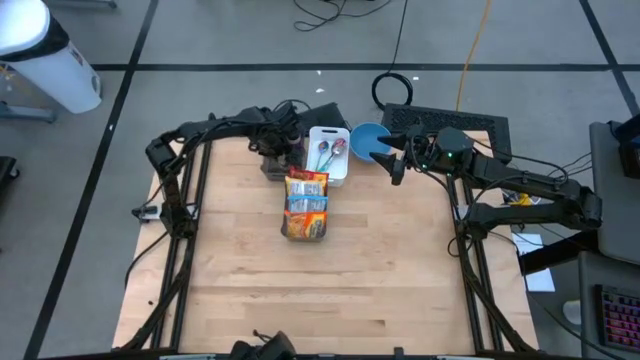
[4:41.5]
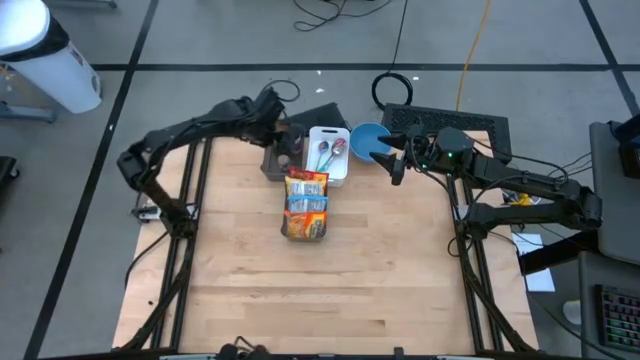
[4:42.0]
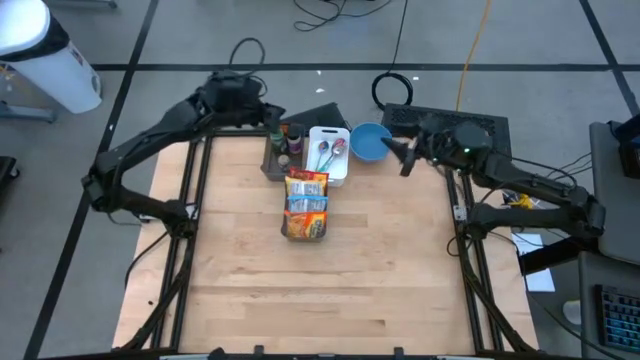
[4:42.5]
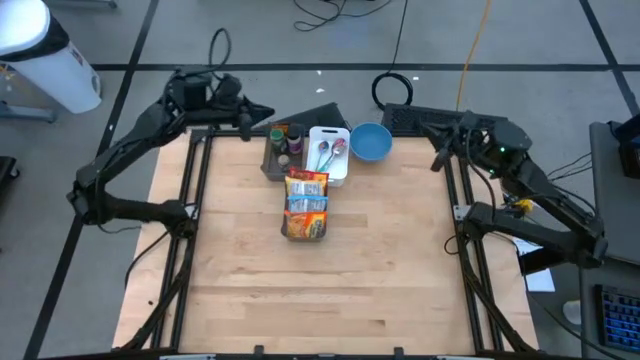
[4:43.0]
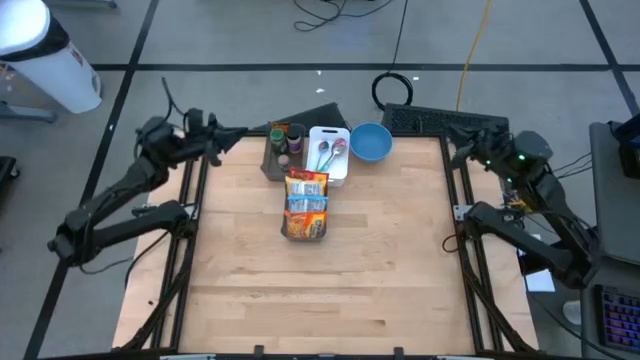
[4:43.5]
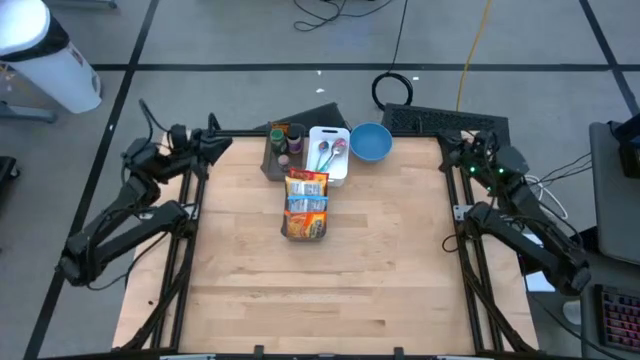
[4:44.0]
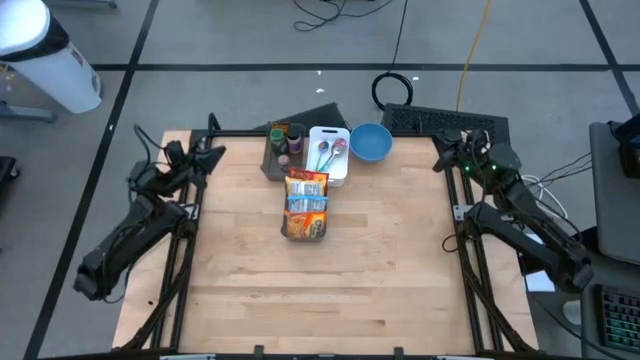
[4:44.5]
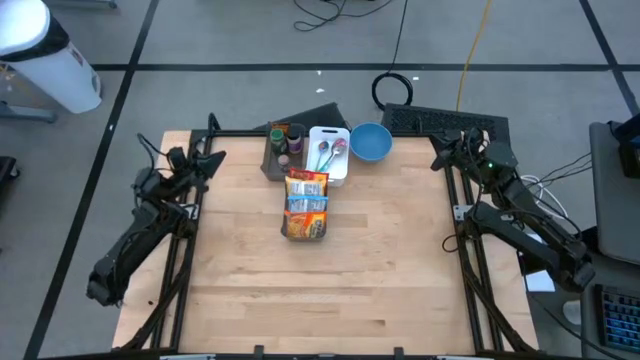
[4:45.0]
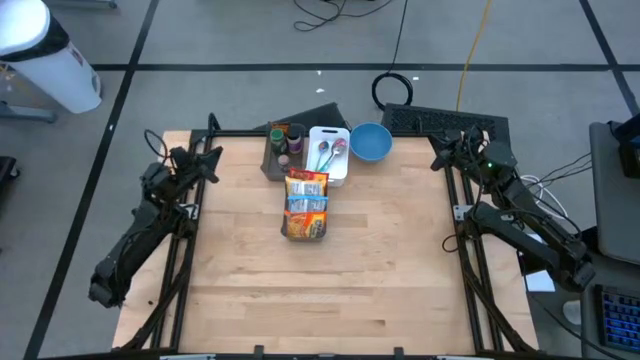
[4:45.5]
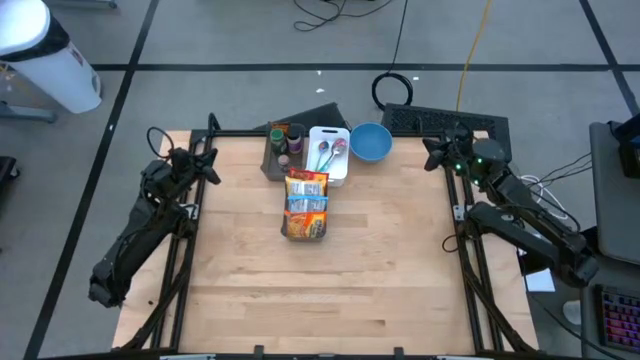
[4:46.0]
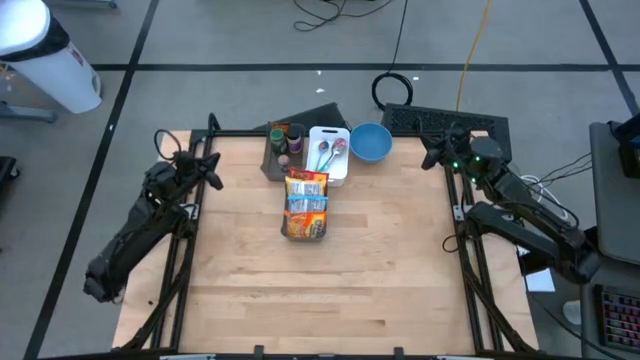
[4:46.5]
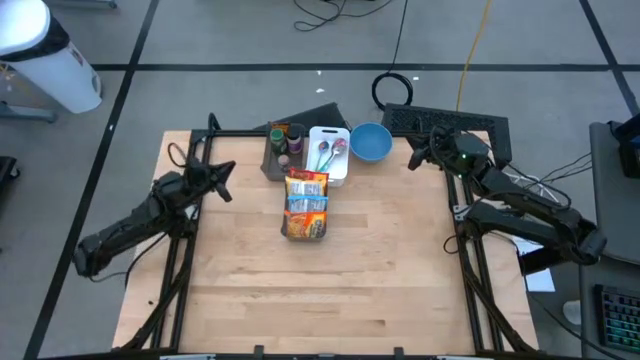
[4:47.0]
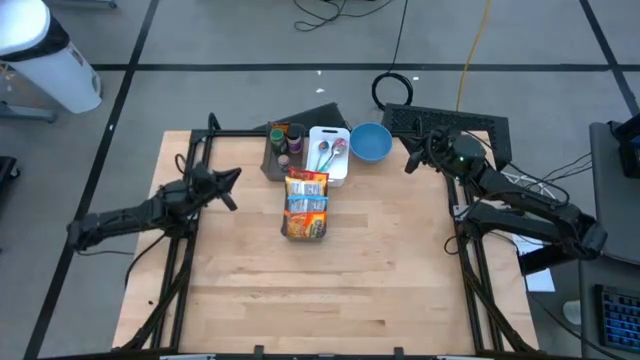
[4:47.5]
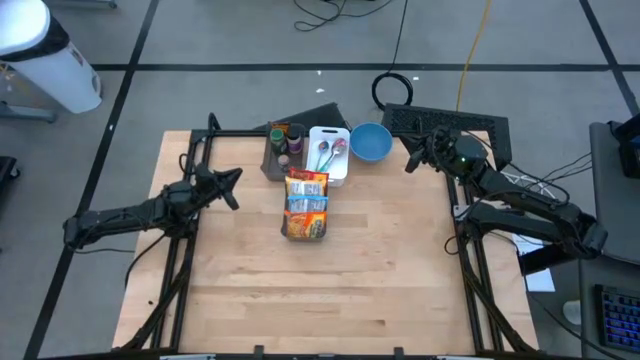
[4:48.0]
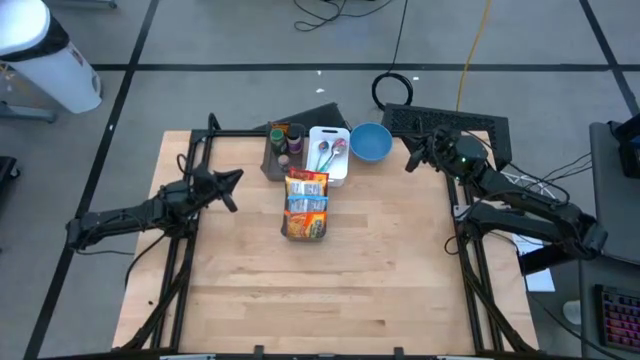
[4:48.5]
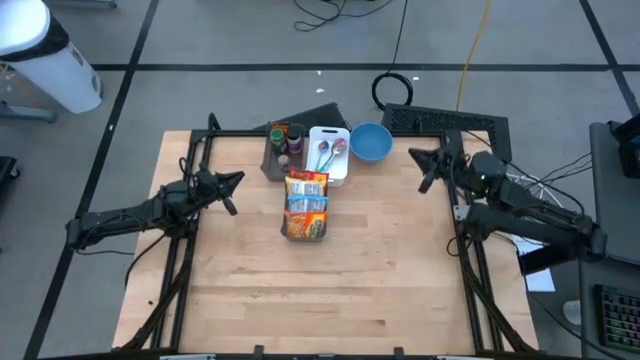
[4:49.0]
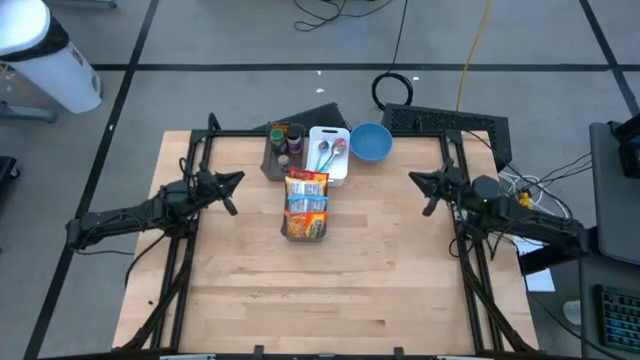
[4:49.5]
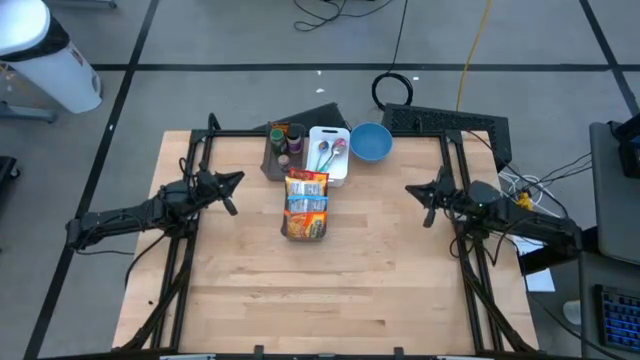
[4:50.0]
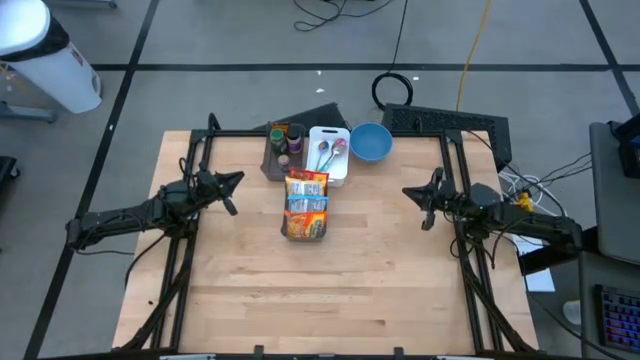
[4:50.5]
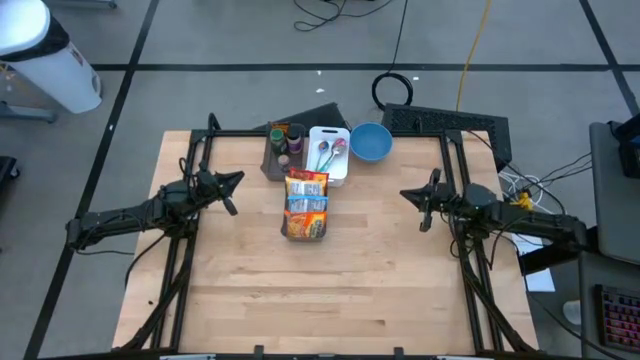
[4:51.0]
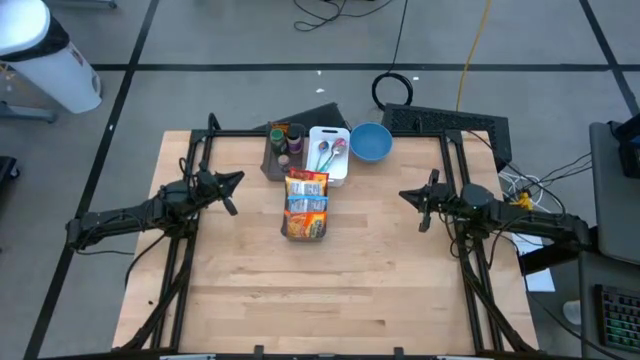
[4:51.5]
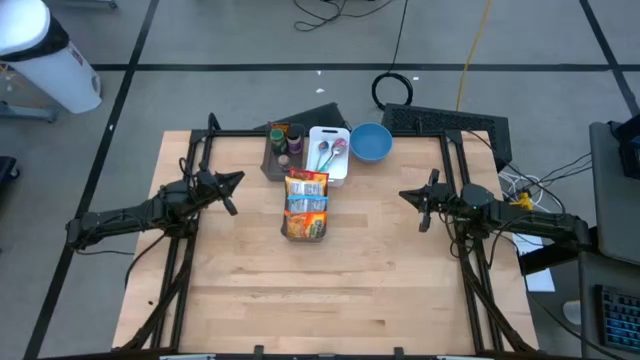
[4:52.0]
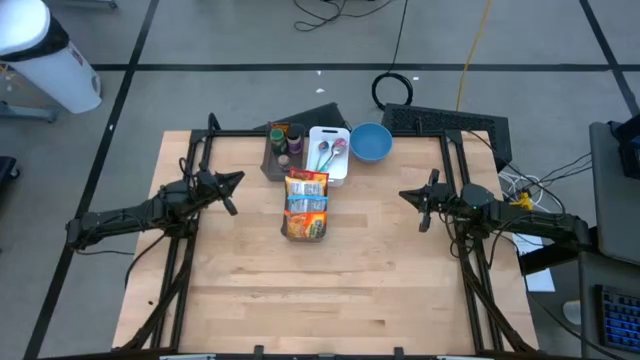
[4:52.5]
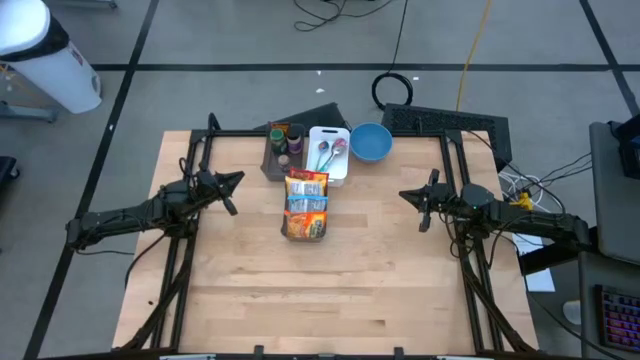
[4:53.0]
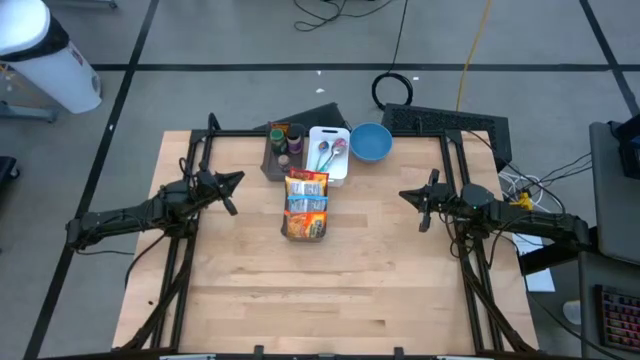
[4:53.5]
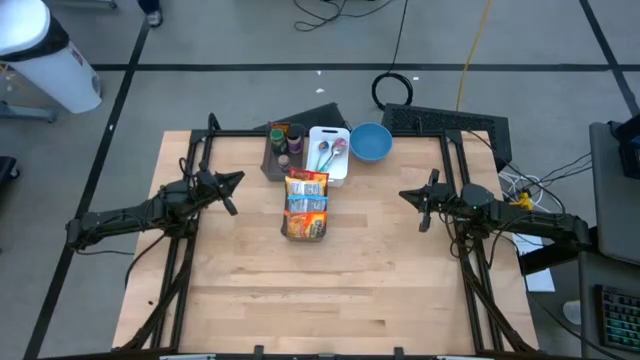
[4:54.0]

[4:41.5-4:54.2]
Task: Pick & Place Food Item
Return to Home Position

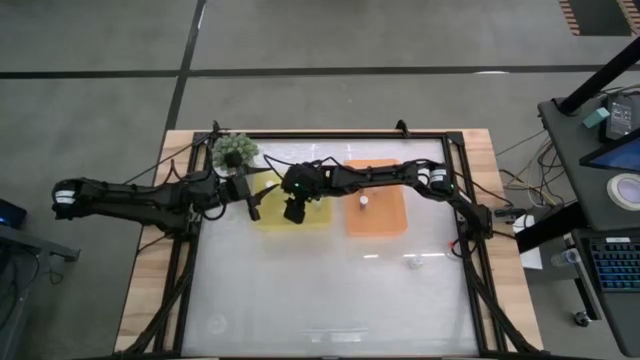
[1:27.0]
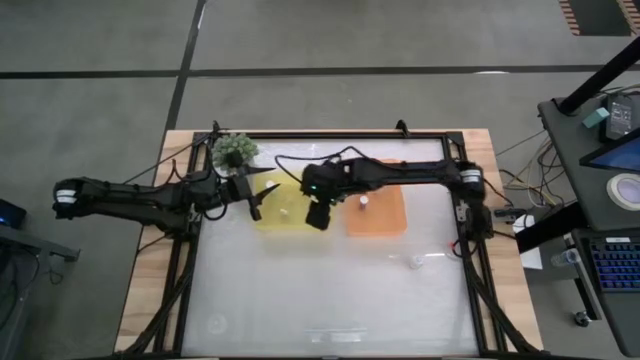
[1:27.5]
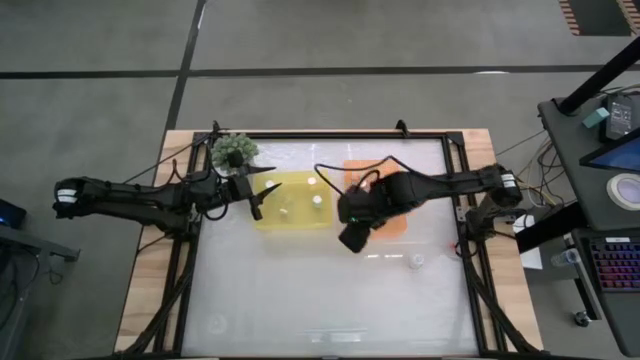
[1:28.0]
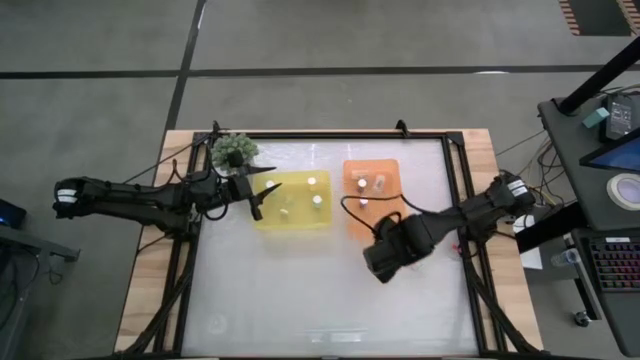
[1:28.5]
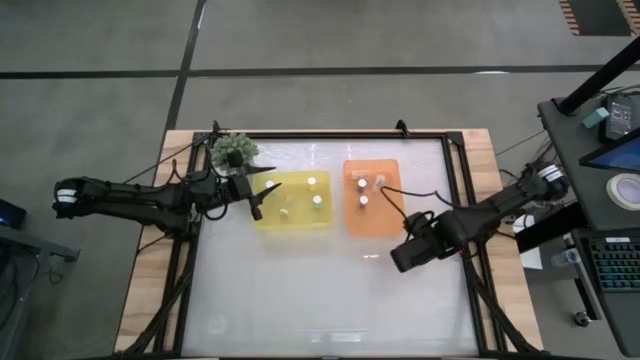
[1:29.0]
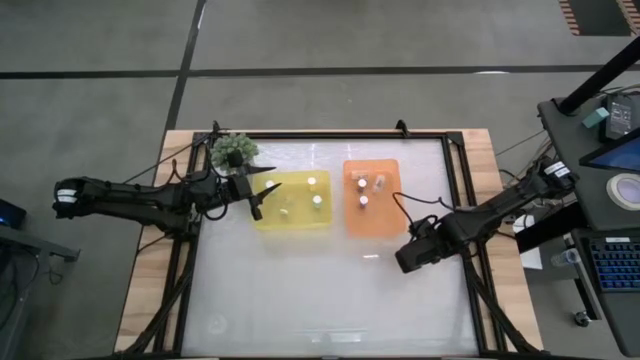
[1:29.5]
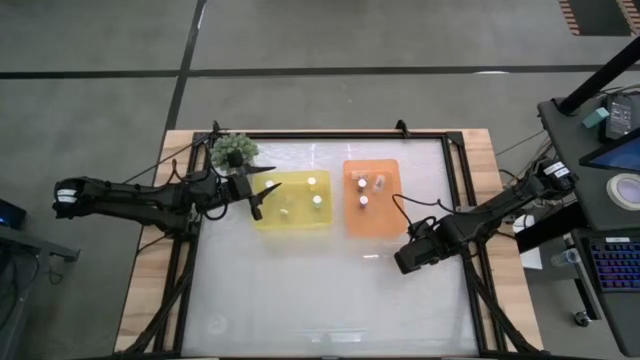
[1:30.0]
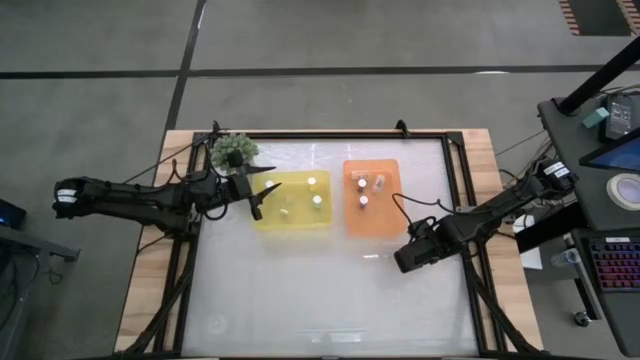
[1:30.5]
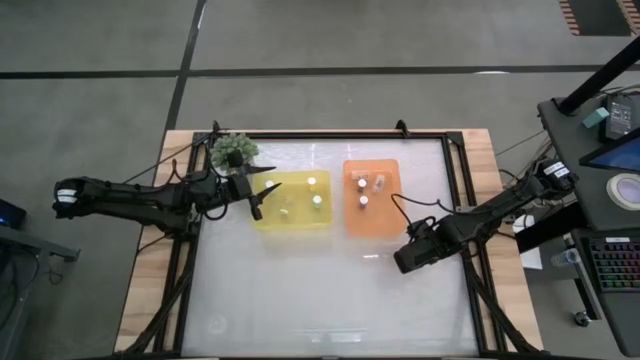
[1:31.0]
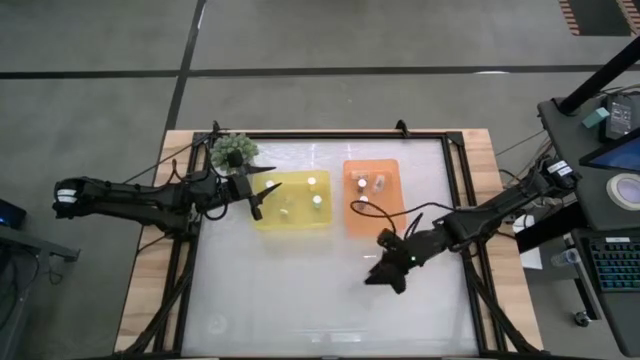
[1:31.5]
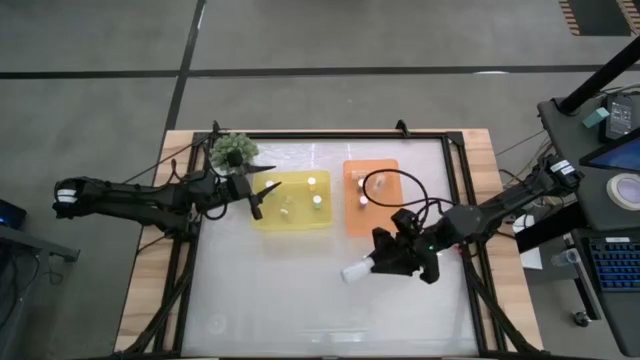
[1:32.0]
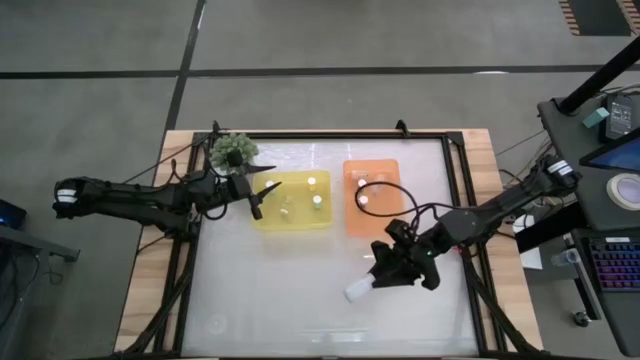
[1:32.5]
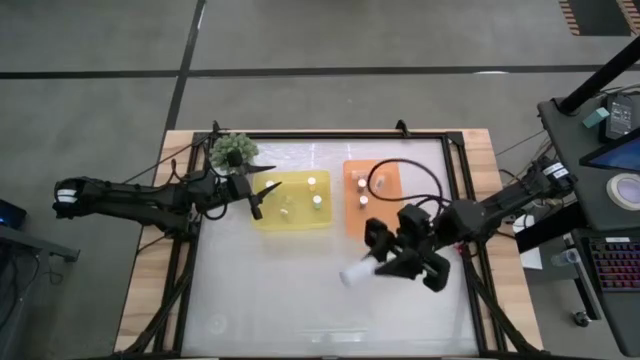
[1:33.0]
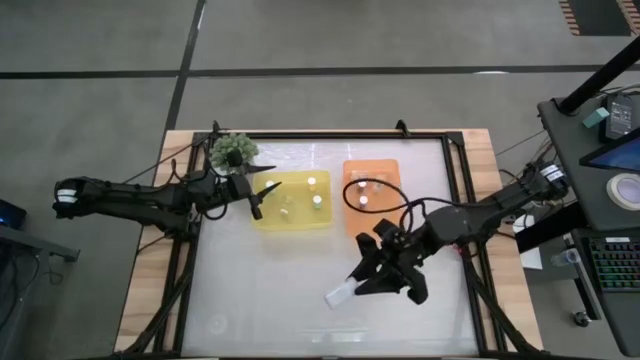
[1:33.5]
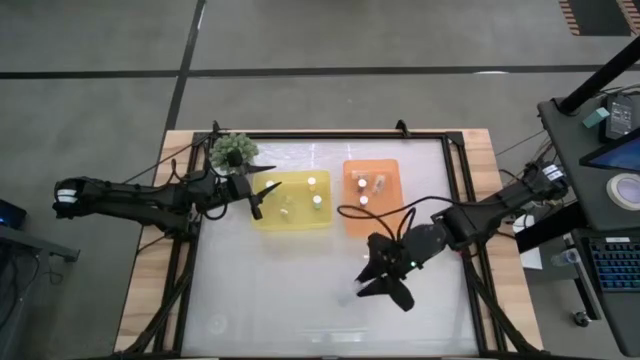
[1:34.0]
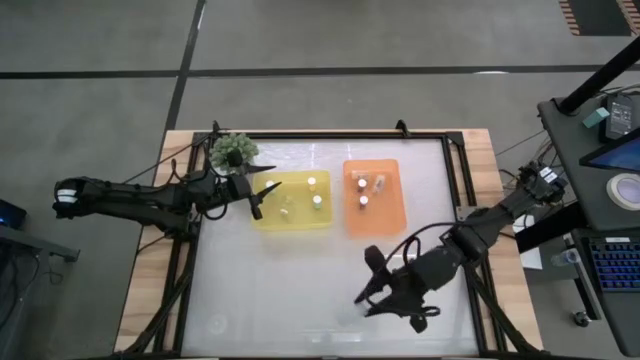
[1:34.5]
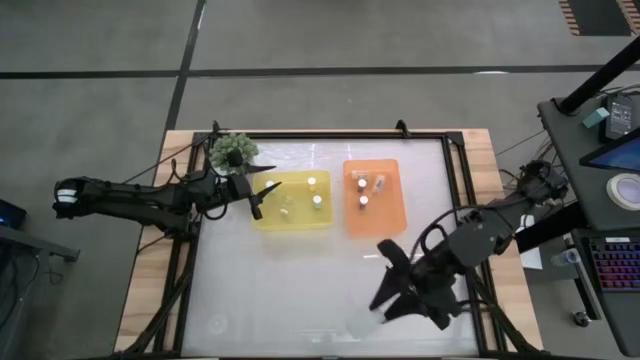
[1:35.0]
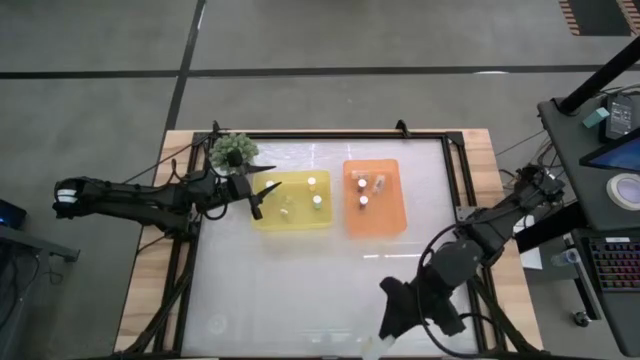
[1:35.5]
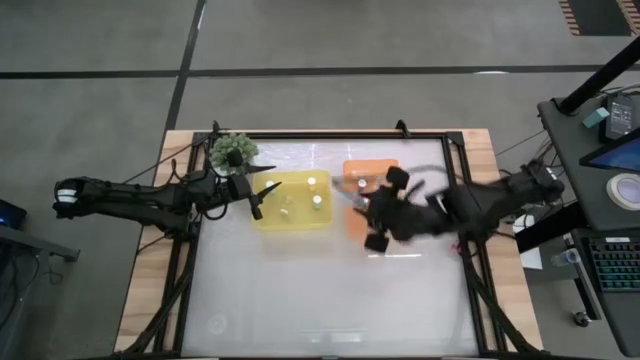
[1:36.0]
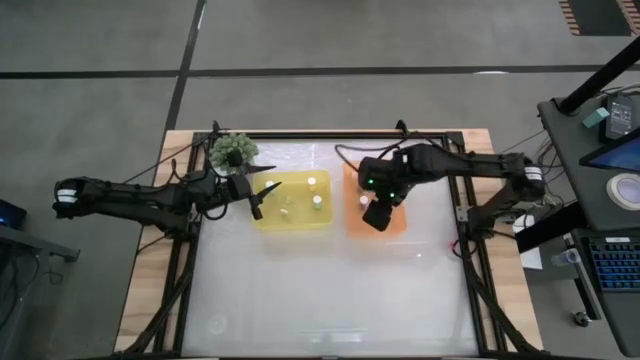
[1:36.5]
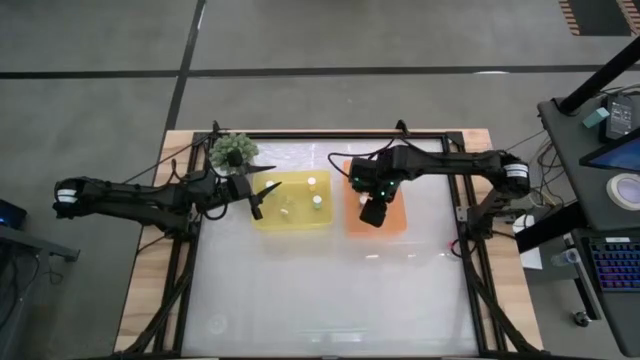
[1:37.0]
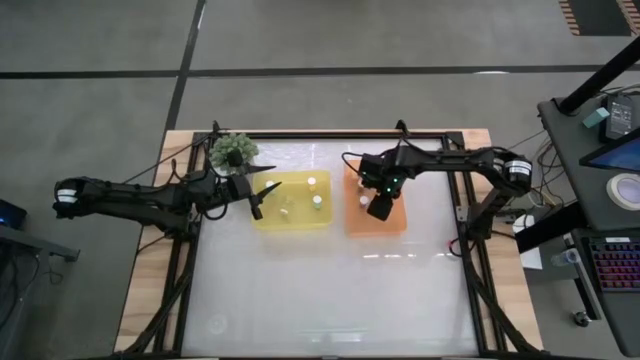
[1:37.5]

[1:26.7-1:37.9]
Task: Pick and place medicine bottles into bin by pill shape (circle, oval)
Put the transparent pill bottle into the orange bin
